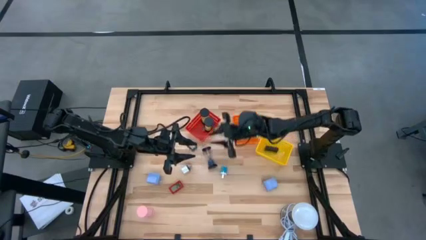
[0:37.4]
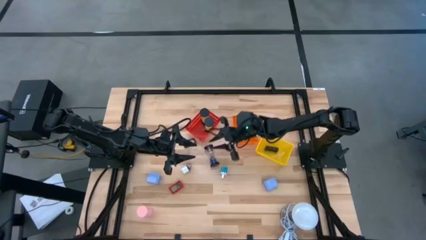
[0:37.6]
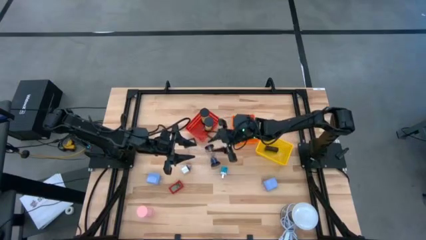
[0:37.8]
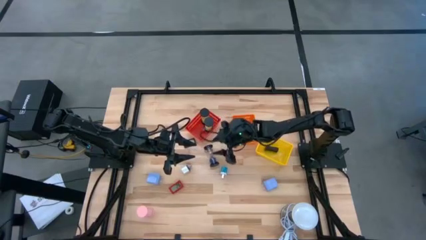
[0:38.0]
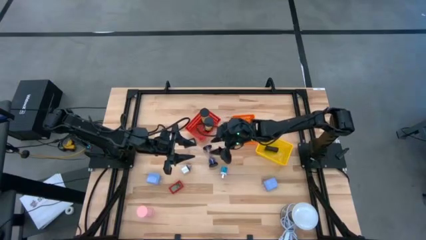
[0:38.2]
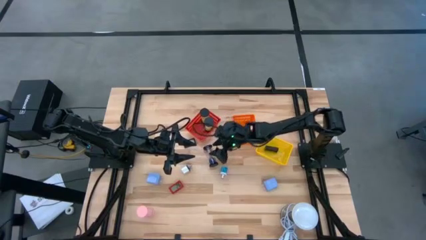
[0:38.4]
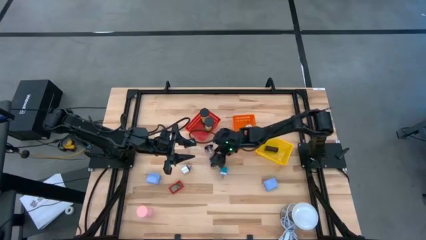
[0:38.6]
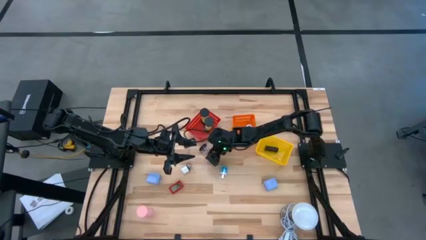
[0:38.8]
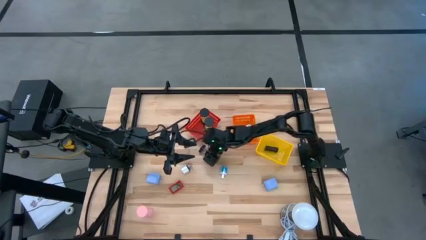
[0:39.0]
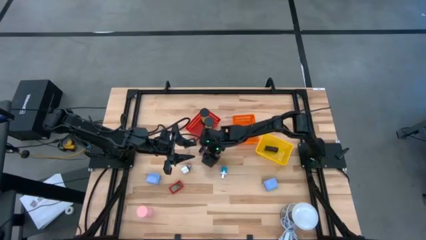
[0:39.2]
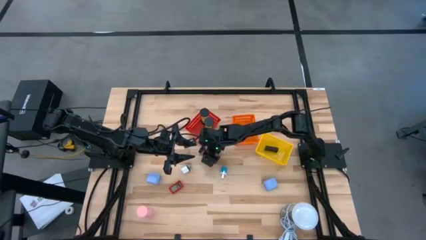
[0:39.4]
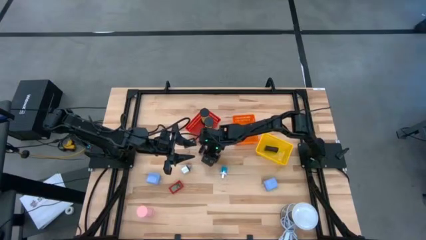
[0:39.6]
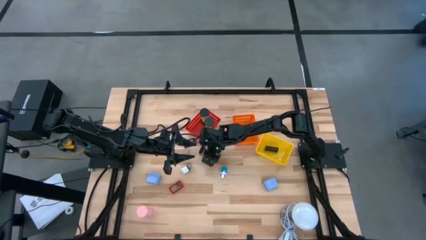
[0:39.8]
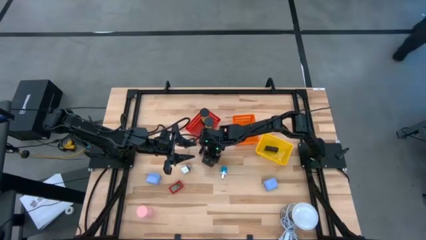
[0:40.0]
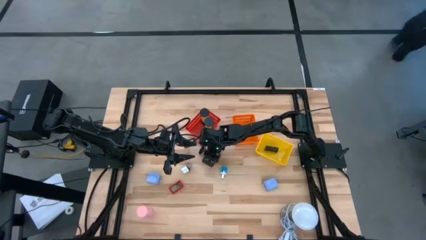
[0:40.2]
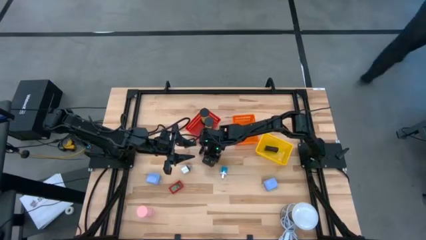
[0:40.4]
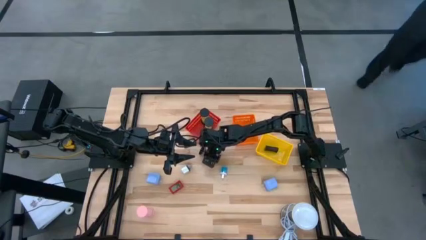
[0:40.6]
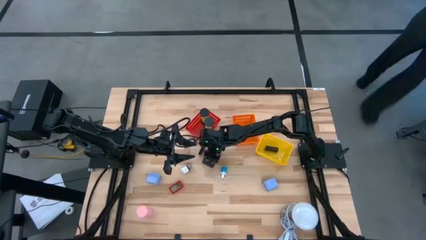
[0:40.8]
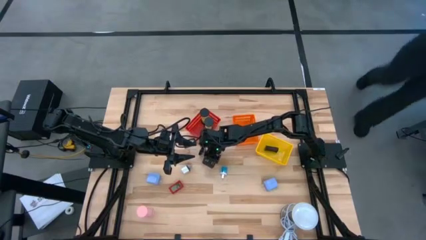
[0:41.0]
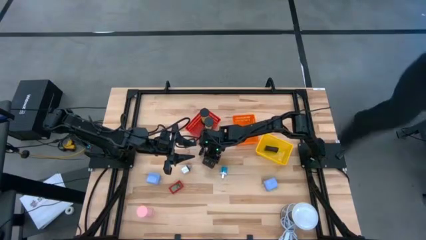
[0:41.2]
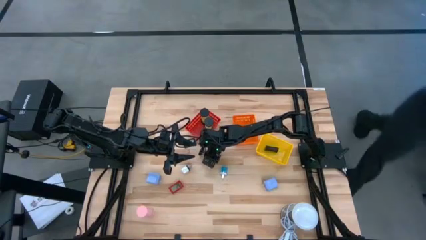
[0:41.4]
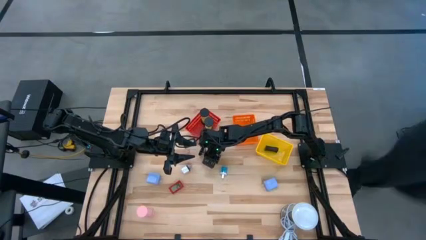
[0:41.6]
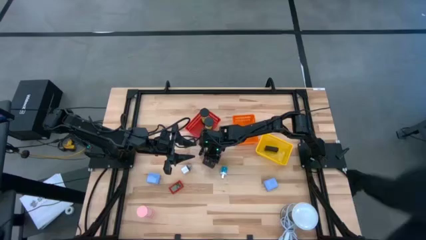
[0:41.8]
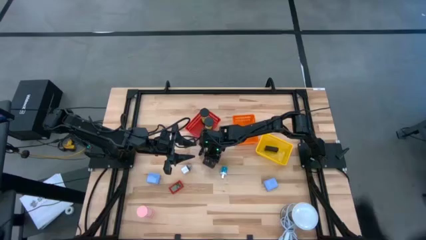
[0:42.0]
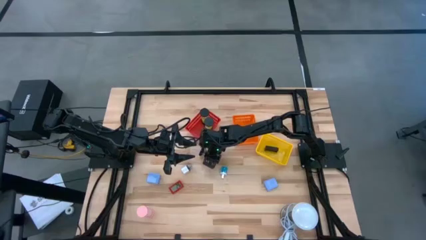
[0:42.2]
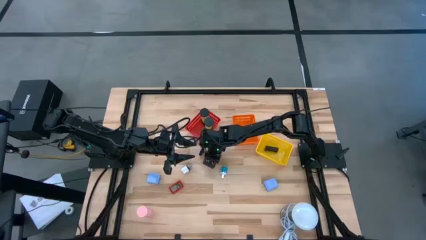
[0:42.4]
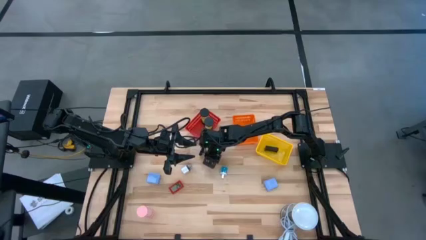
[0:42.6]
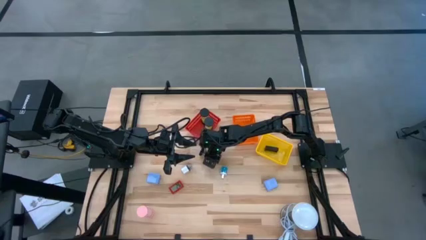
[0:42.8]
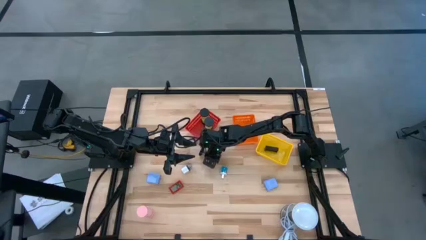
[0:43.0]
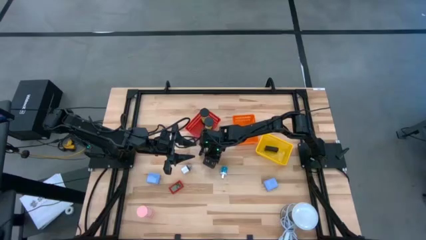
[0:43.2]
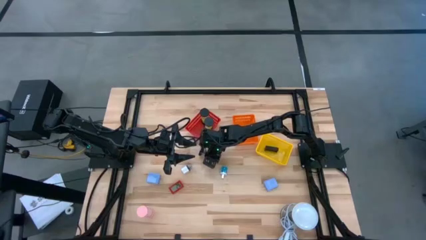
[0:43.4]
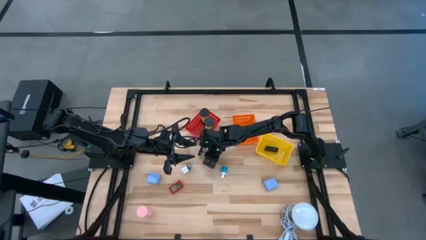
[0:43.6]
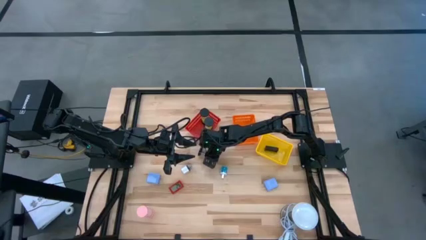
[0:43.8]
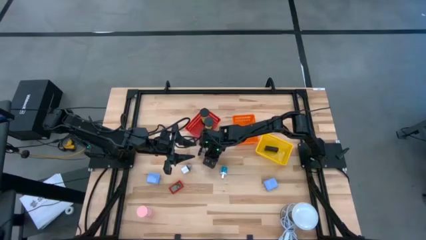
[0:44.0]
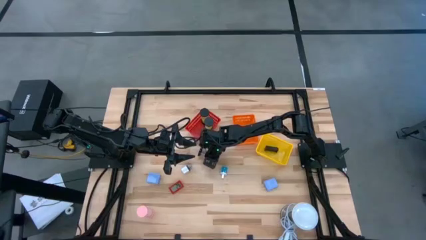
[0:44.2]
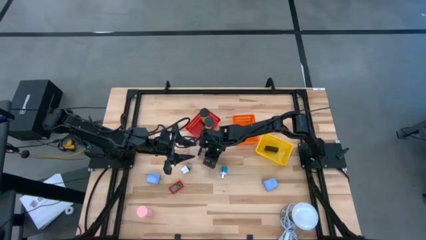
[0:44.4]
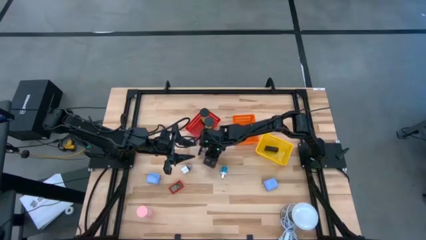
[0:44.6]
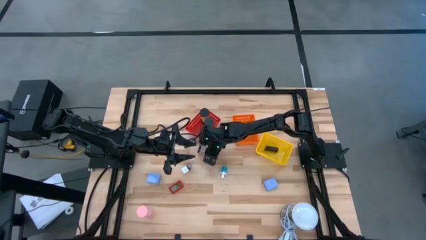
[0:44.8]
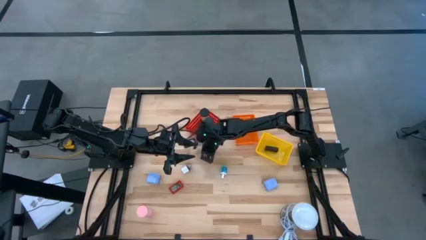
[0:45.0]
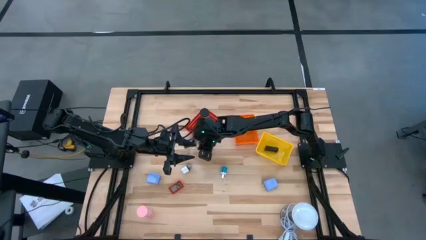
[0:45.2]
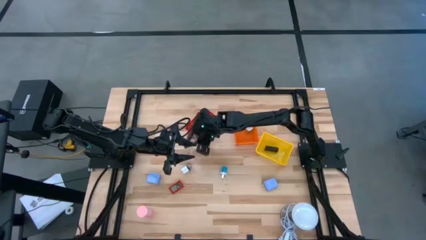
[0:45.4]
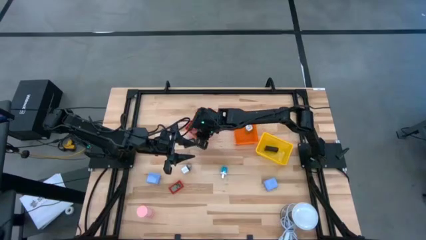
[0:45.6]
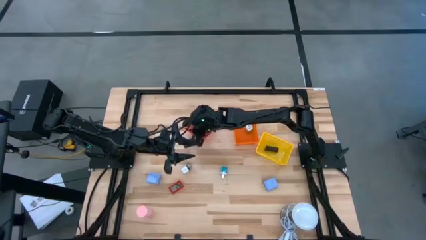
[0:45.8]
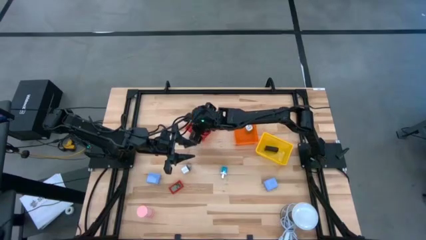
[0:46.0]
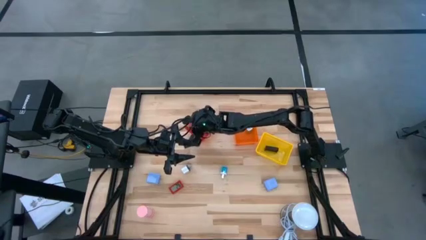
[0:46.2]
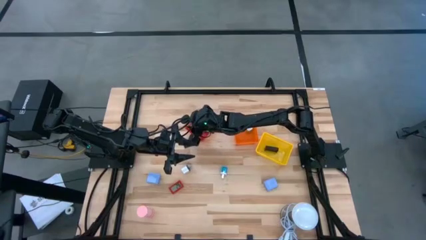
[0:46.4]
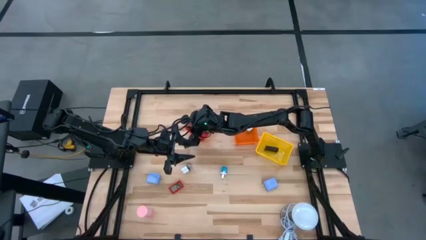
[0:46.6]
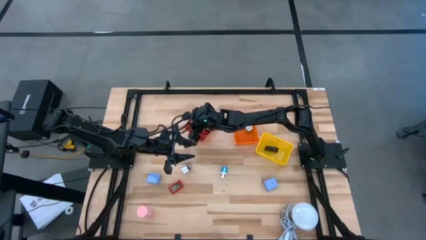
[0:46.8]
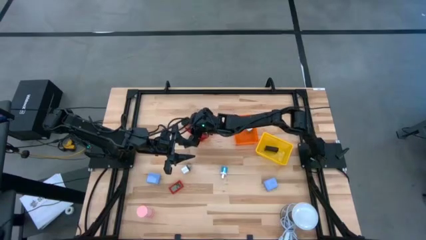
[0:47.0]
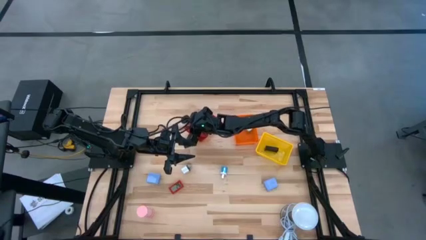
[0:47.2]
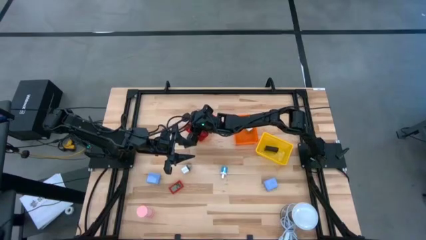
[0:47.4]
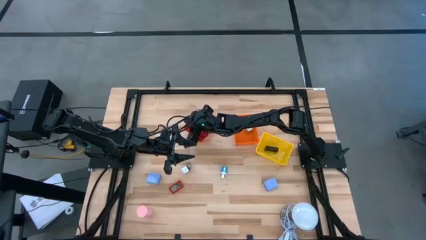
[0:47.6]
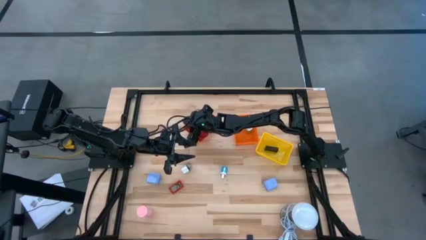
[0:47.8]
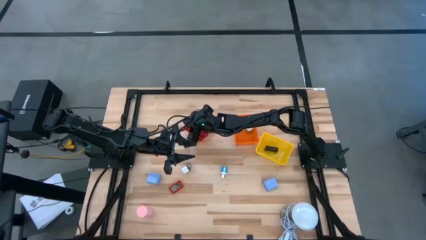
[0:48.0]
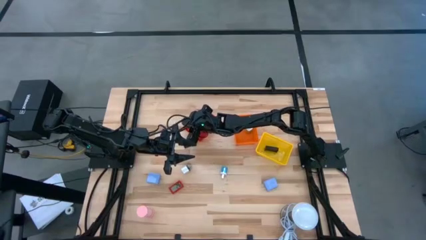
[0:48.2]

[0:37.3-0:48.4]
Task: Pick & Place Office items
Put the blue hourglass into the red bin
